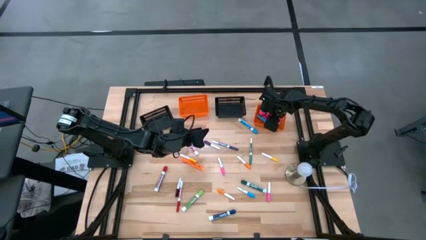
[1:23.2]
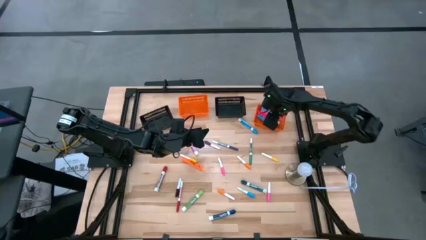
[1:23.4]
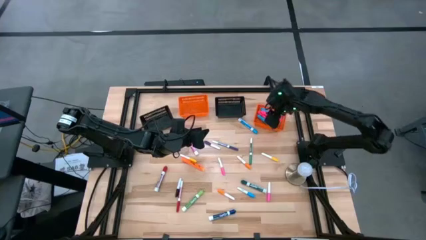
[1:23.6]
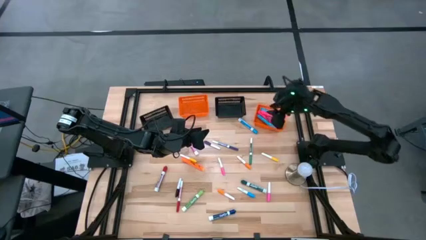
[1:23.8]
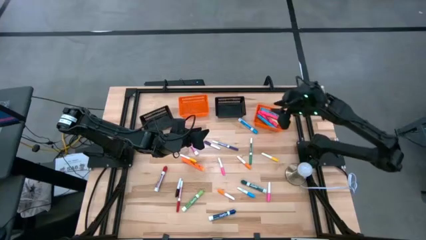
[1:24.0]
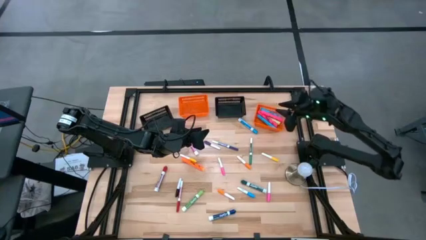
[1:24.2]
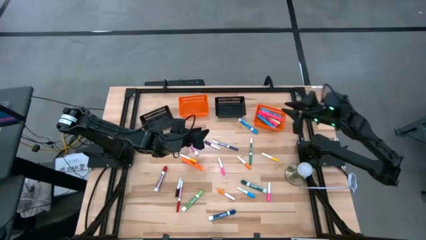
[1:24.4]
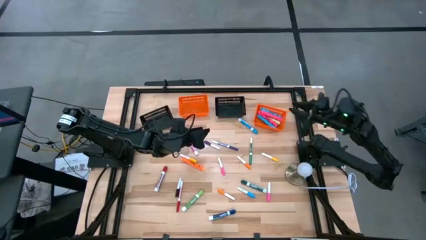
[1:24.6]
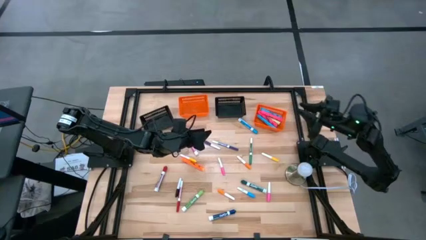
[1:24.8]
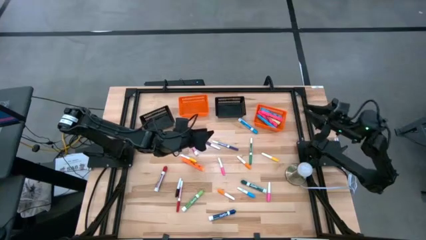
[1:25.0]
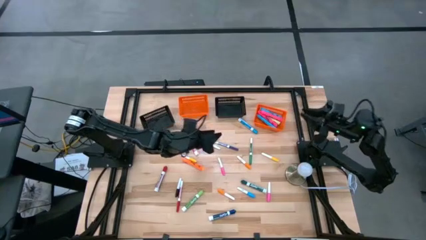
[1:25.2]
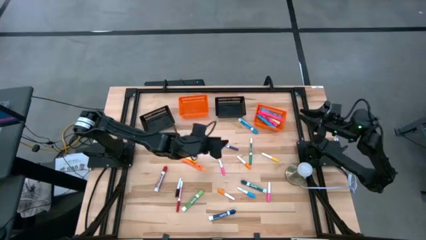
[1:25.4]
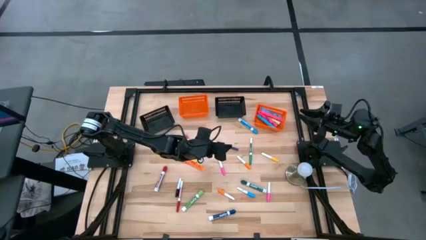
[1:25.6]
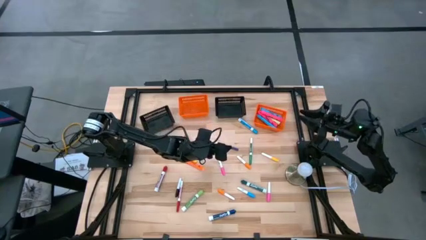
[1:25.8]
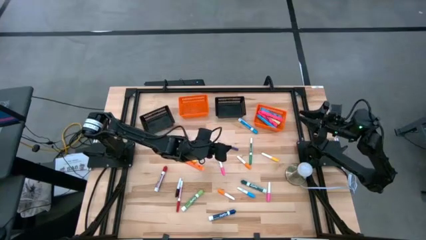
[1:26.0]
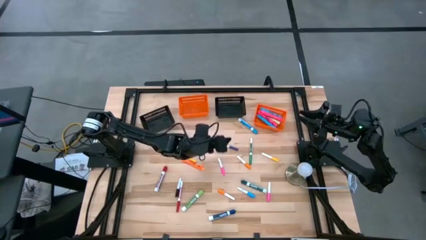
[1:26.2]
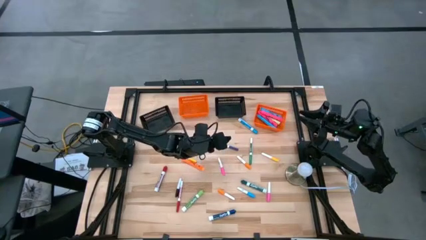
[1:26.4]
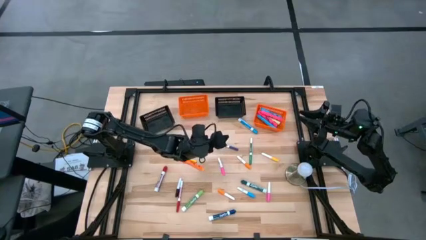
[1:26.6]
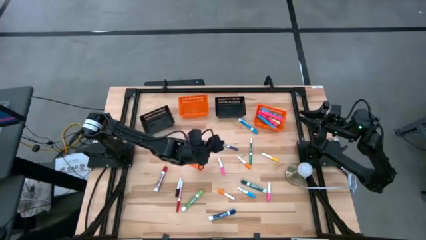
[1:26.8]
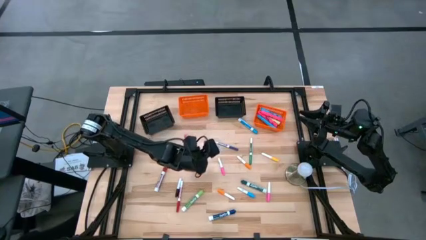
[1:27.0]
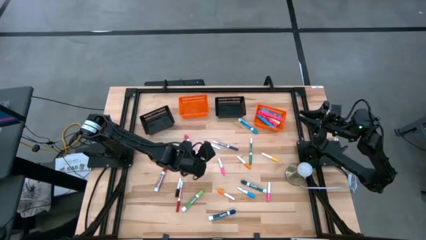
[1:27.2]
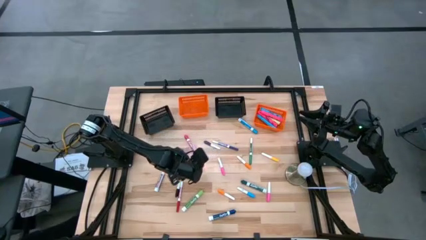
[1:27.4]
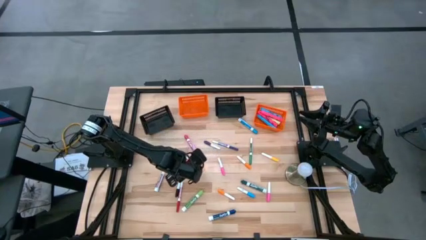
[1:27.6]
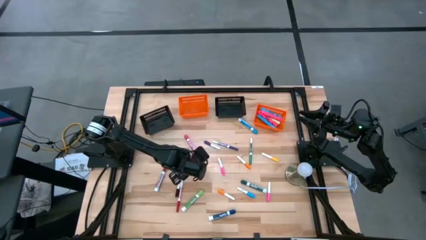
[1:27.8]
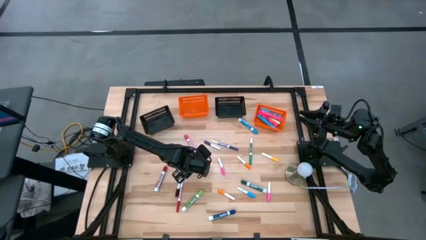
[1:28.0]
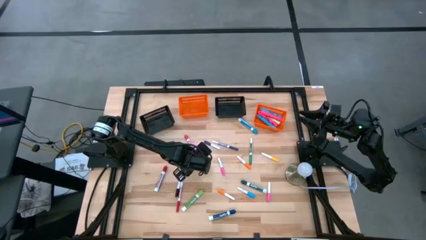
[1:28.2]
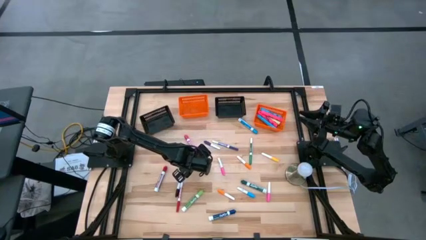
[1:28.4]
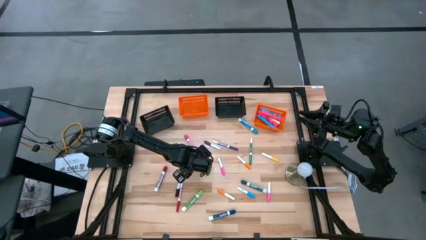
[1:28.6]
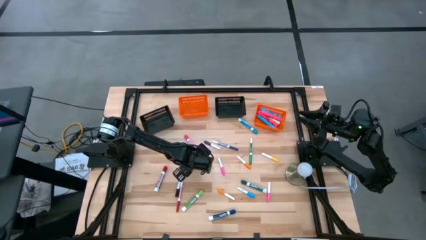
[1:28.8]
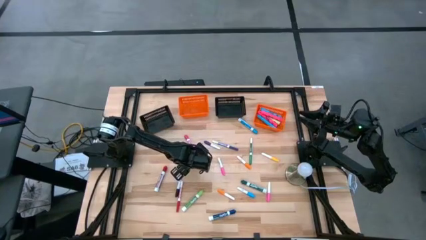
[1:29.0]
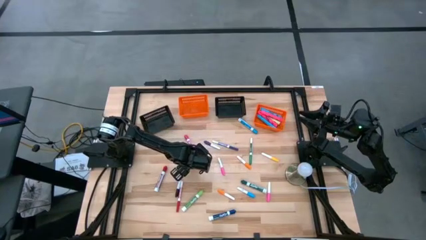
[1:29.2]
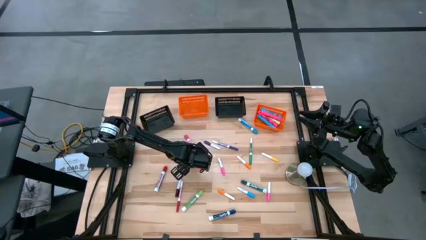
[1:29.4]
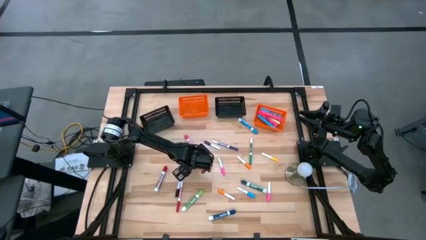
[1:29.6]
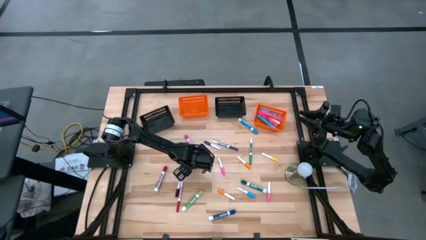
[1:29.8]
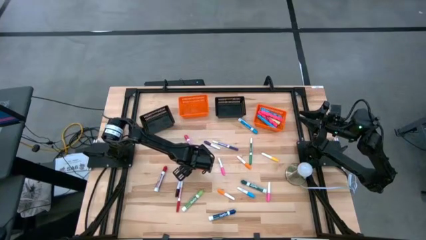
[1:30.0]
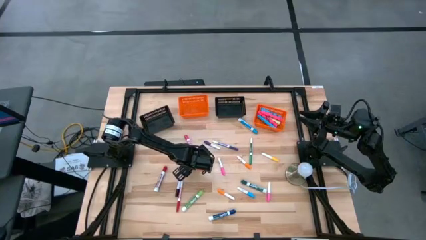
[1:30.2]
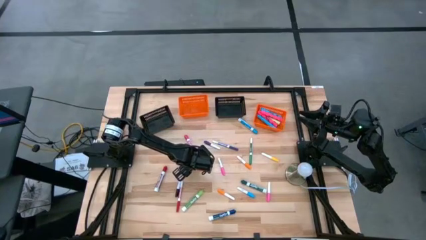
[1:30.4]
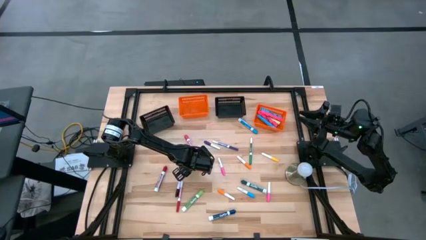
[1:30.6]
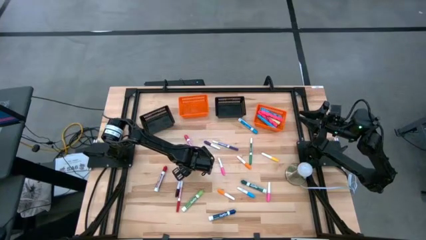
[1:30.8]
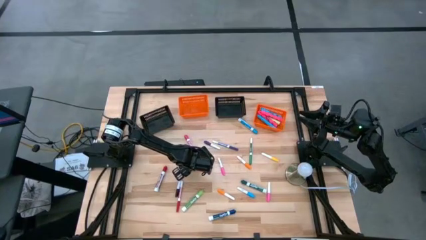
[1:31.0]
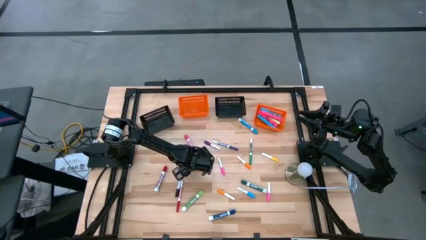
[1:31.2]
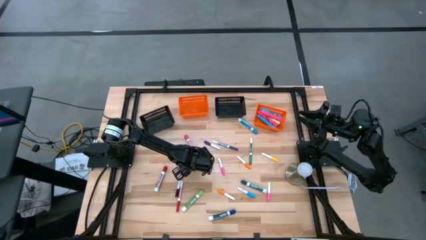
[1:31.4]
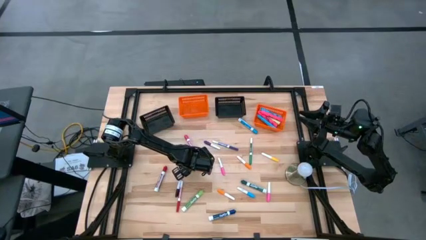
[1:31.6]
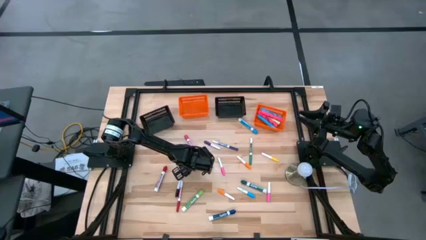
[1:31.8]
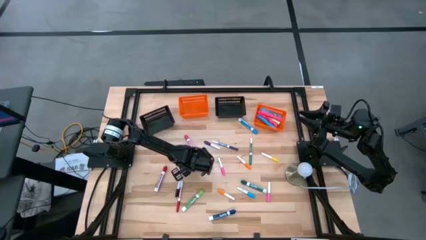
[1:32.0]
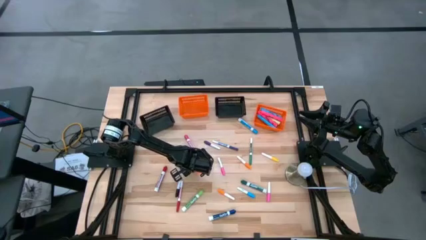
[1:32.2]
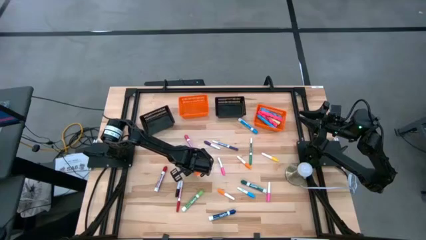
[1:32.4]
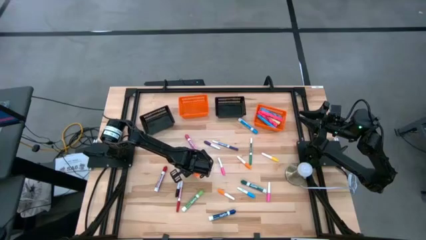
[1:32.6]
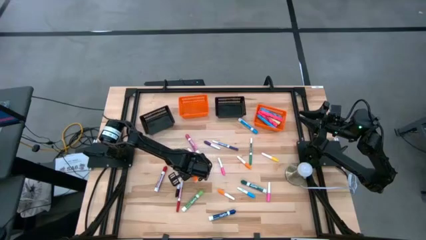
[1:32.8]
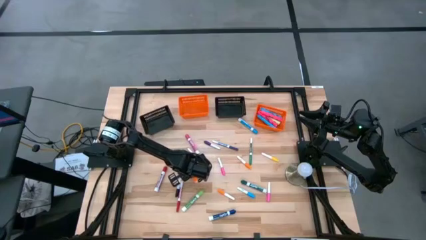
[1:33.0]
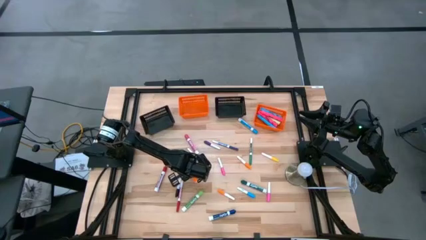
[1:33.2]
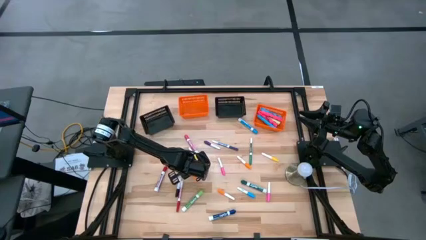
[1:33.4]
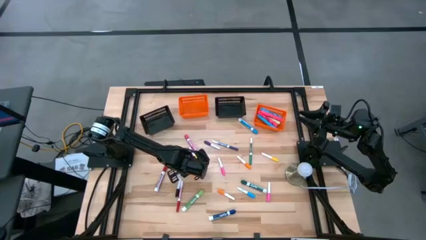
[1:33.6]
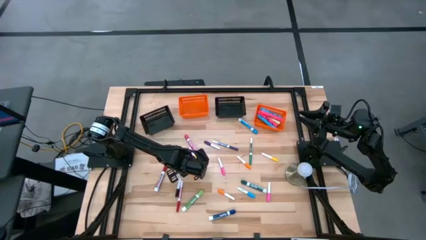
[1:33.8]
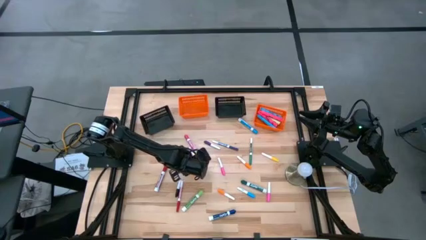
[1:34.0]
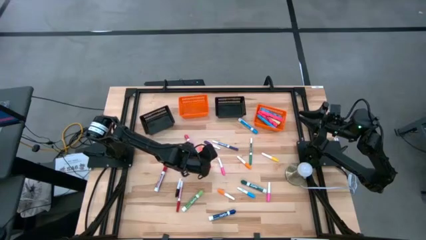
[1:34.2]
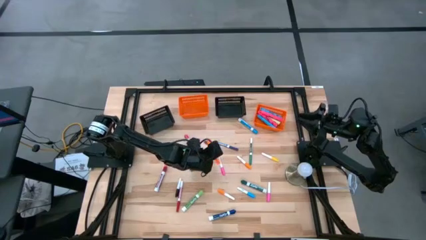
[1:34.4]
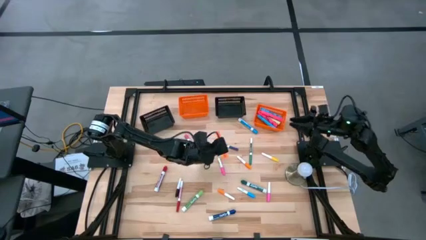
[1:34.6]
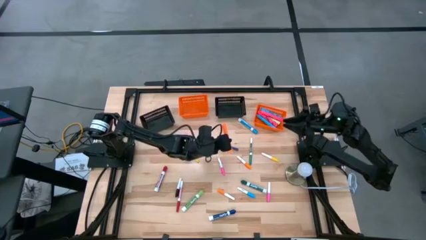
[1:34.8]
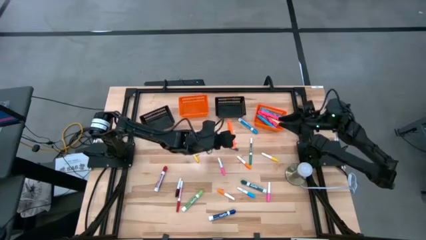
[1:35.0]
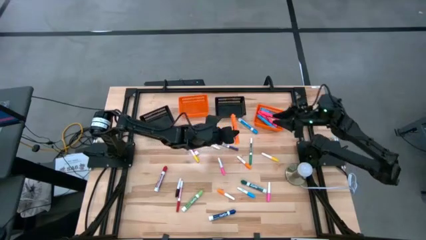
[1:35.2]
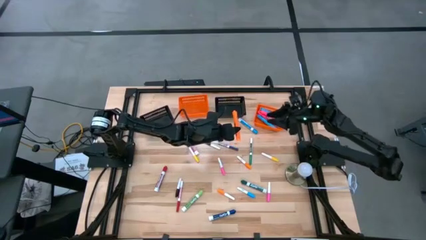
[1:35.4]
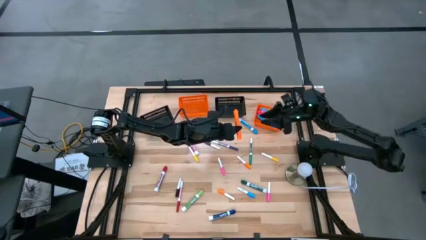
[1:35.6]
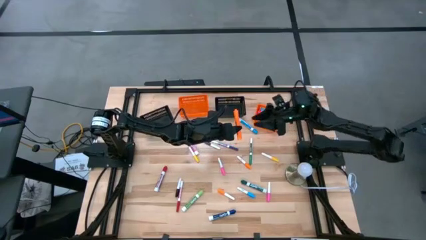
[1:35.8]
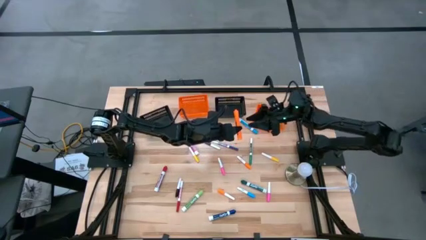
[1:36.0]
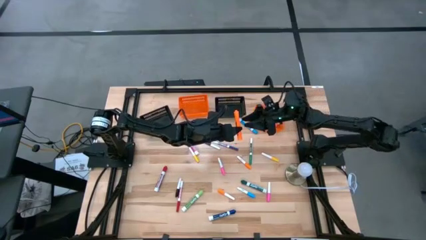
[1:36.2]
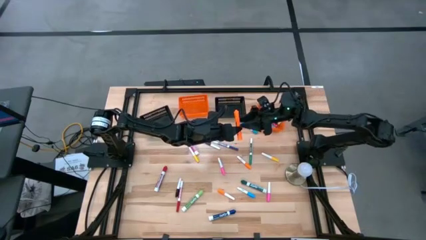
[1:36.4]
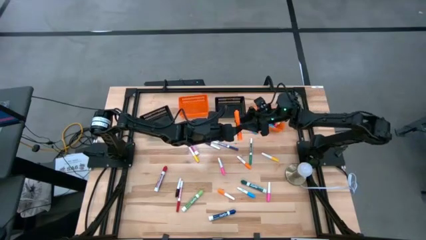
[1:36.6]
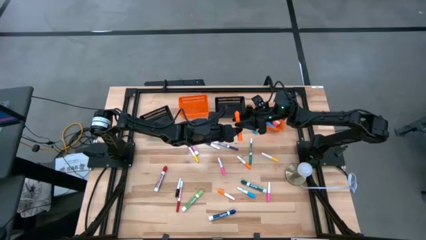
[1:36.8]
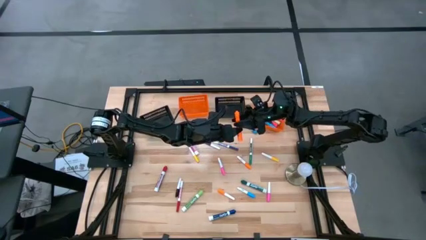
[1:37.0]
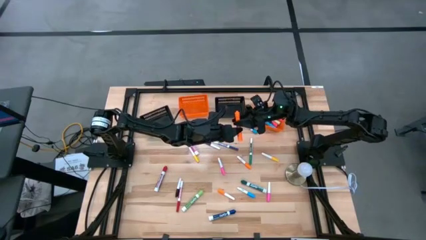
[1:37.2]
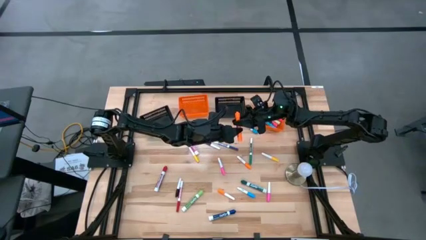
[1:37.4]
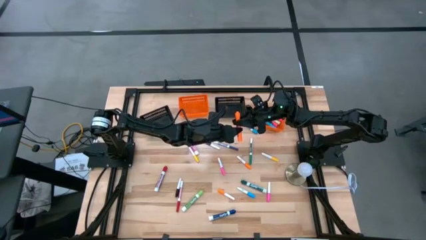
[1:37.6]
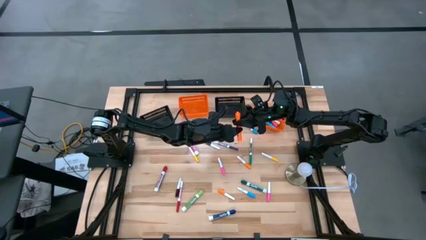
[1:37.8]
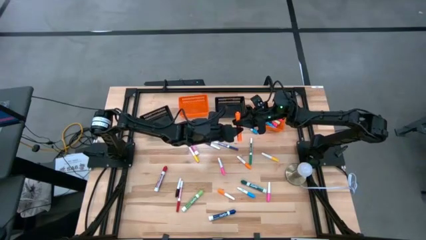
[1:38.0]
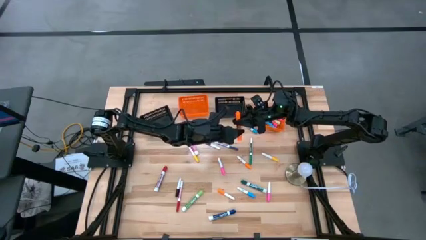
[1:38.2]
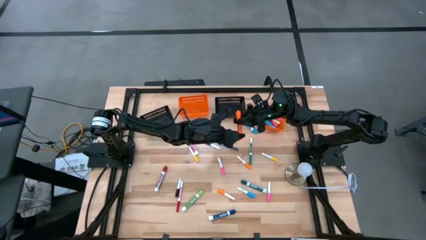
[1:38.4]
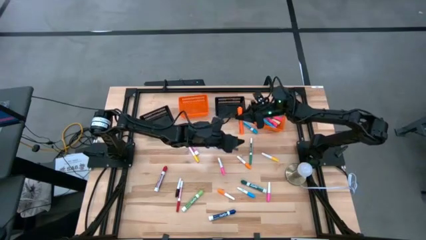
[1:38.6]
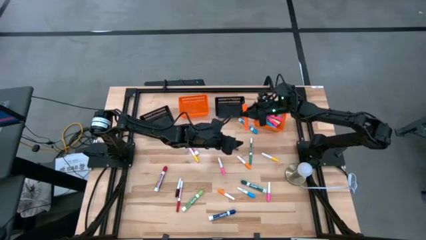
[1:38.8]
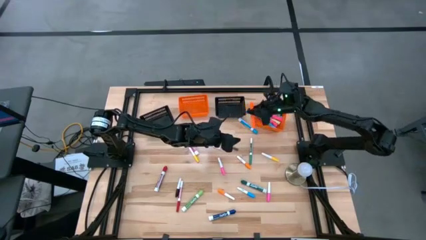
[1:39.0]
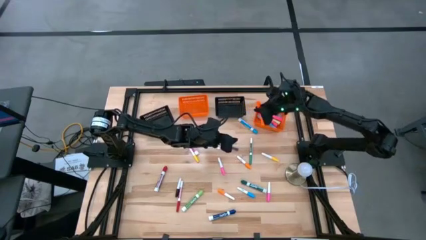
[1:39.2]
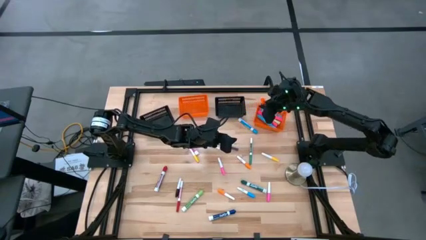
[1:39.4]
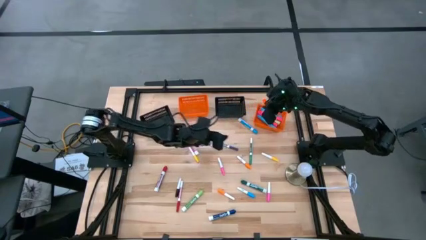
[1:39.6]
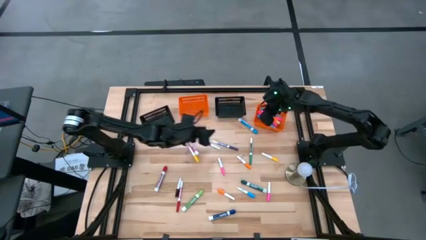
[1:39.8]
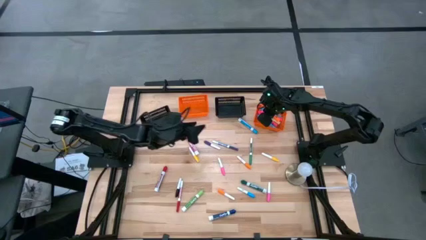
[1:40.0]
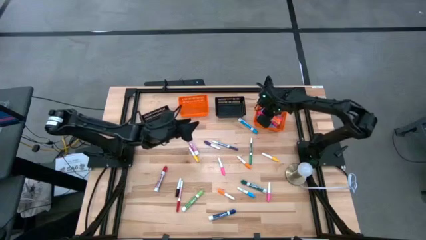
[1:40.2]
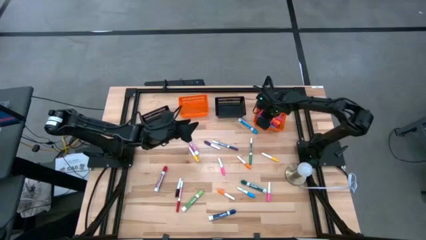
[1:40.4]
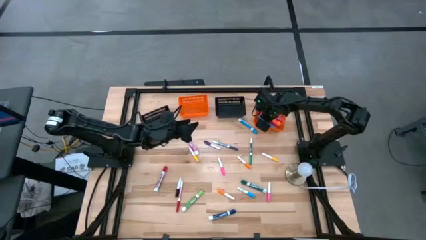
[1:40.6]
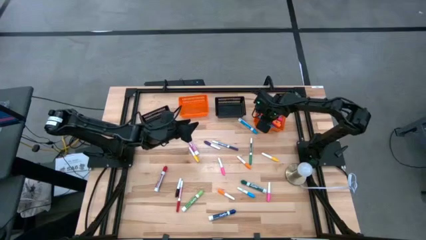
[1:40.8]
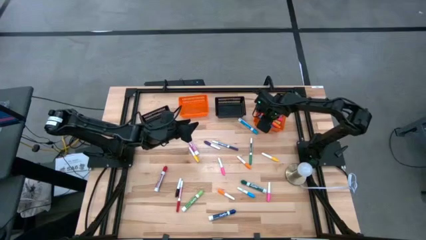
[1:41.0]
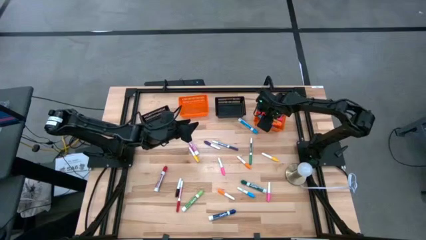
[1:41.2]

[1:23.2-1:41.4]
Task: Pick & Place Markers
Put the orange marker into the right orange bin
